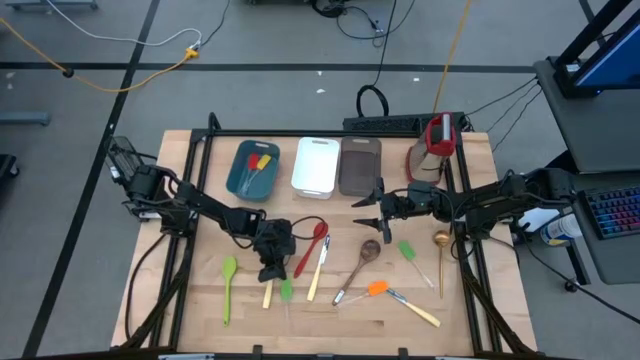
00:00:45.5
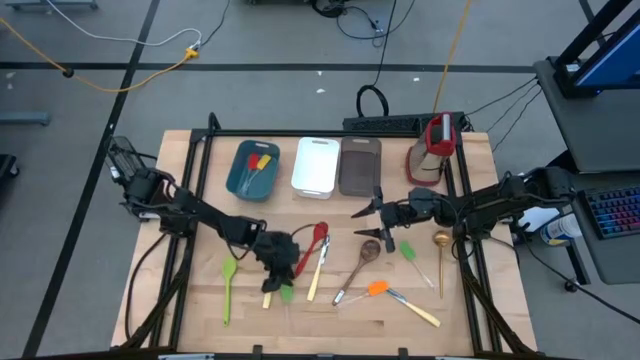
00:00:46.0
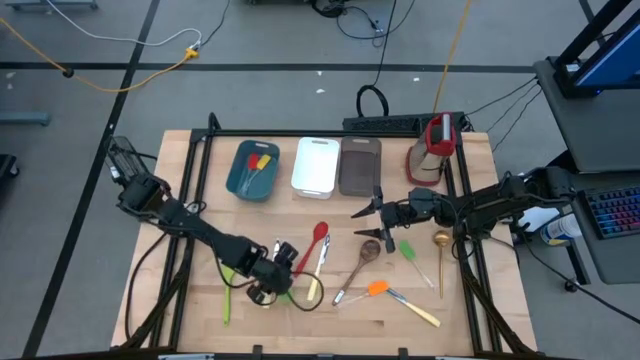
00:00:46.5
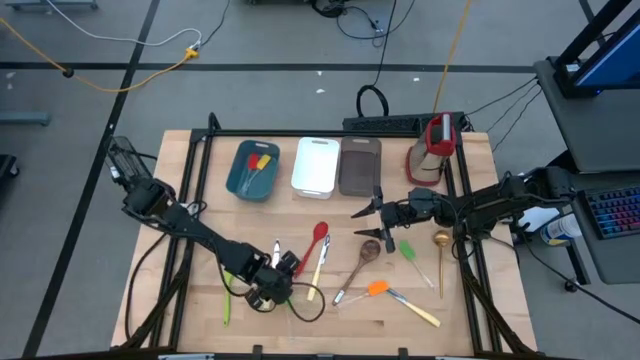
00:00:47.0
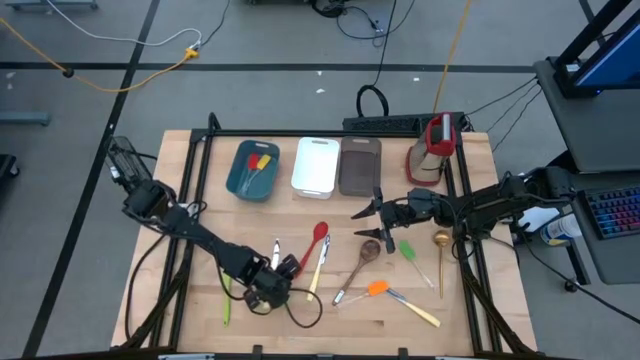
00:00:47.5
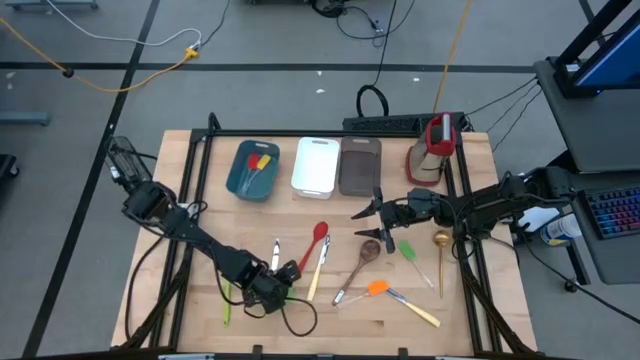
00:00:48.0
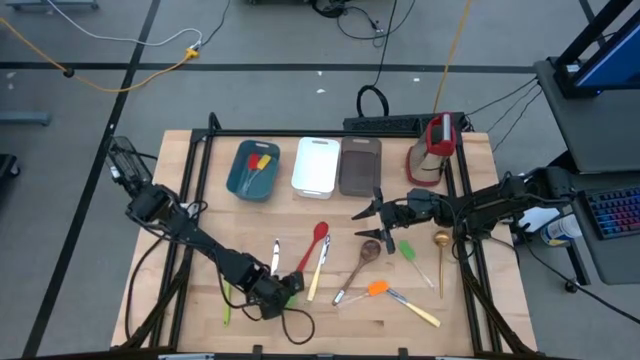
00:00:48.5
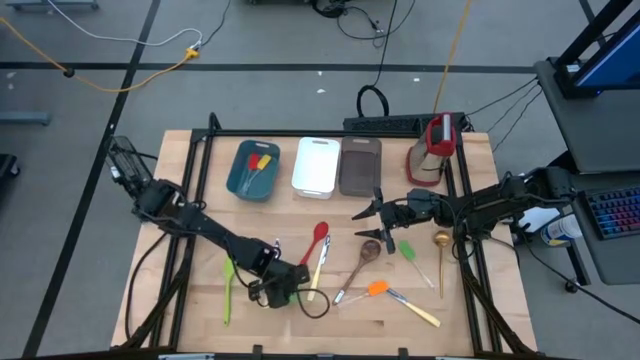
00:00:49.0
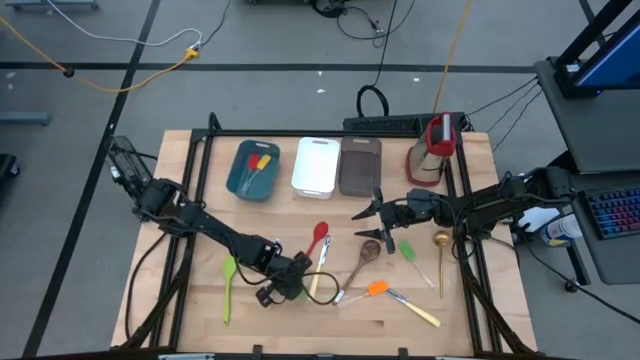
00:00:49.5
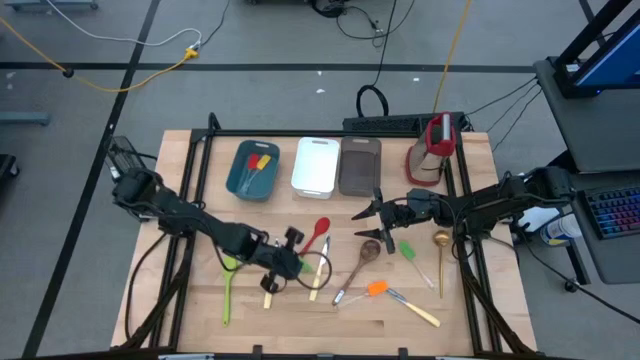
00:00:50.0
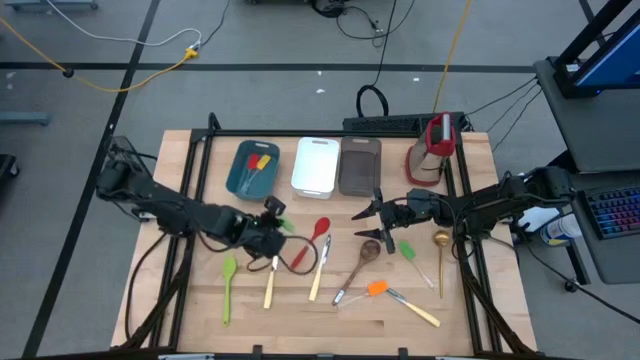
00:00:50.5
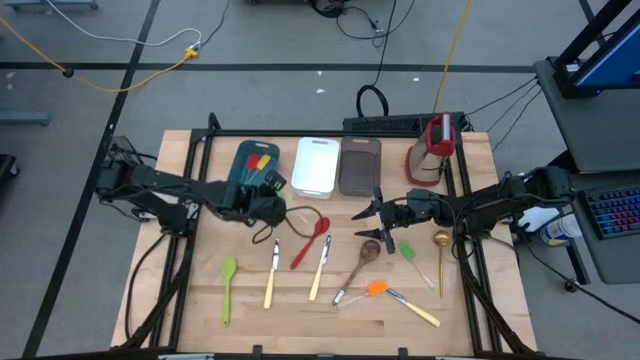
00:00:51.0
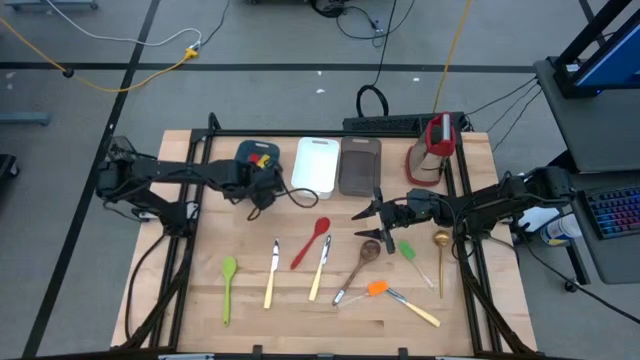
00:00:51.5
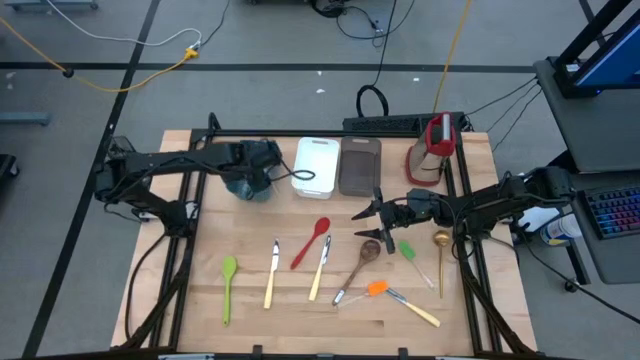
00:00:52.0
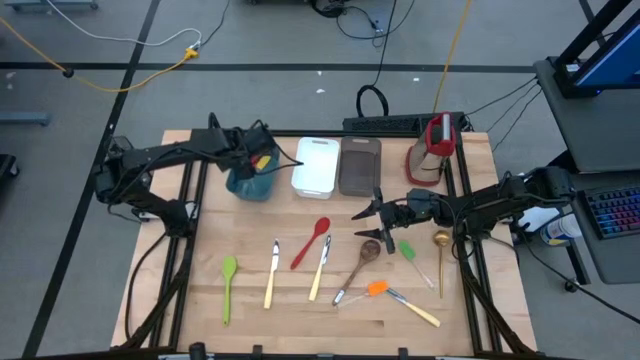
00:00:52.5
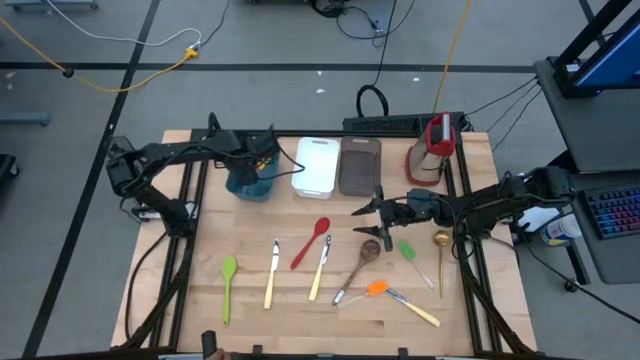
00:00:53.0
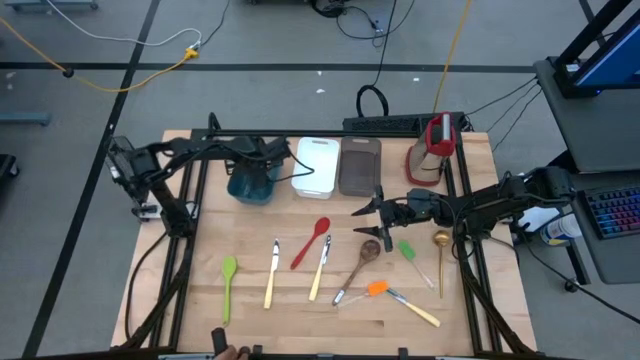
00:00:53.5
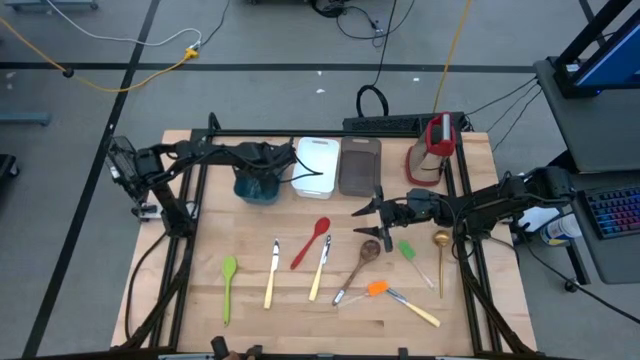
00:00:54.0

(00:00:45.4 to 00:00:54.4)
Task: Pick & Place Kitchen Items
Put the left green spatula into the blue bin

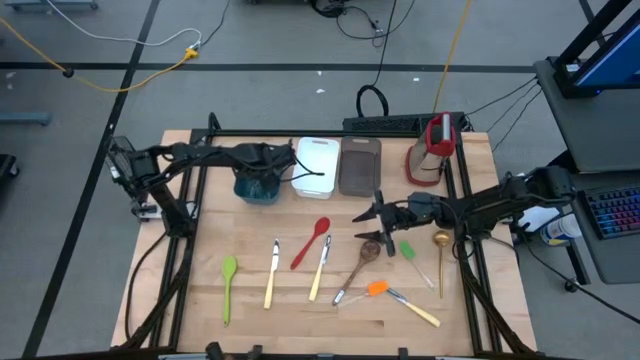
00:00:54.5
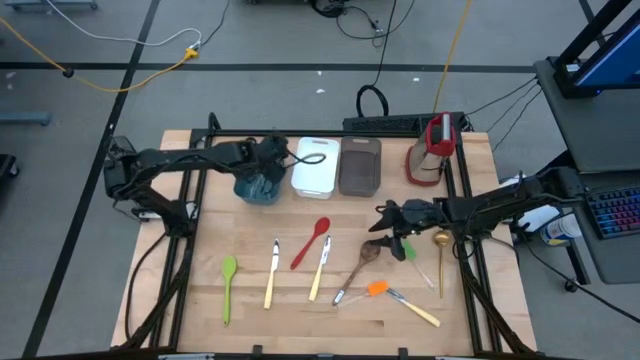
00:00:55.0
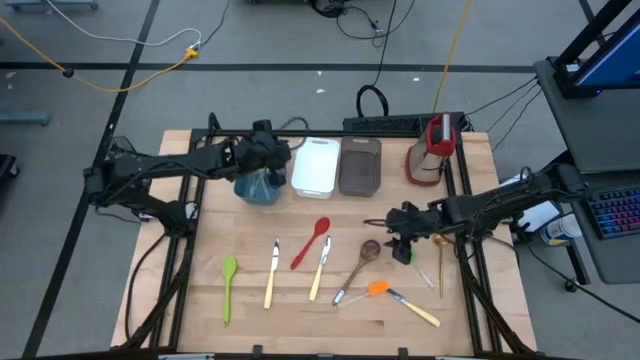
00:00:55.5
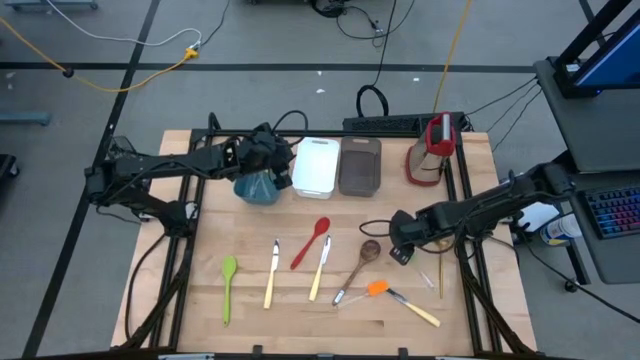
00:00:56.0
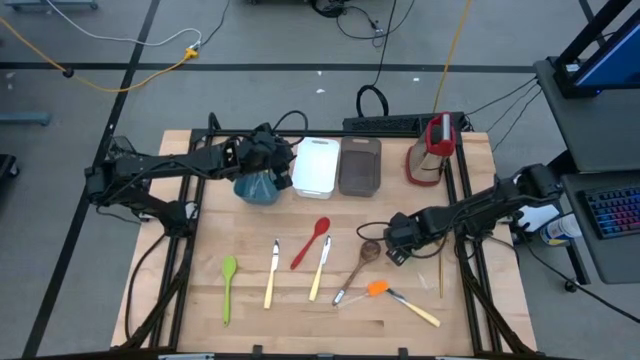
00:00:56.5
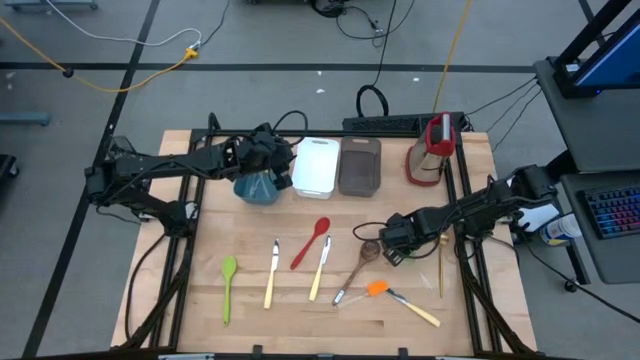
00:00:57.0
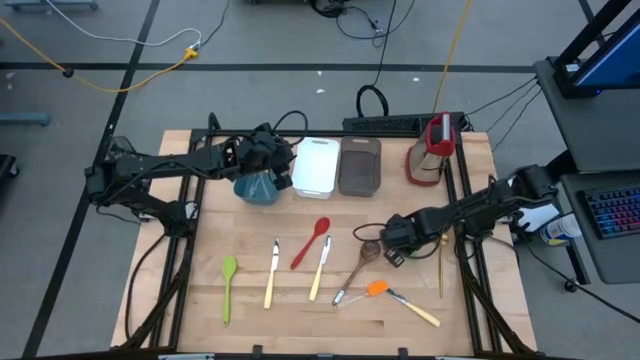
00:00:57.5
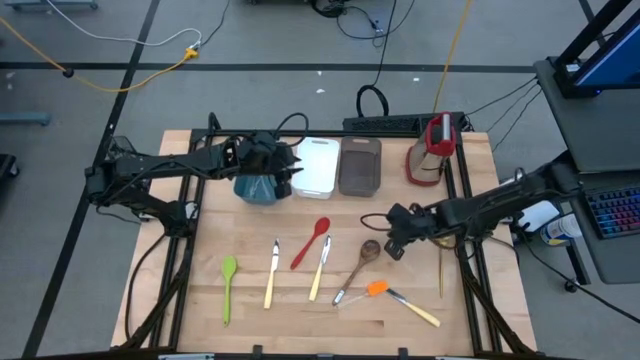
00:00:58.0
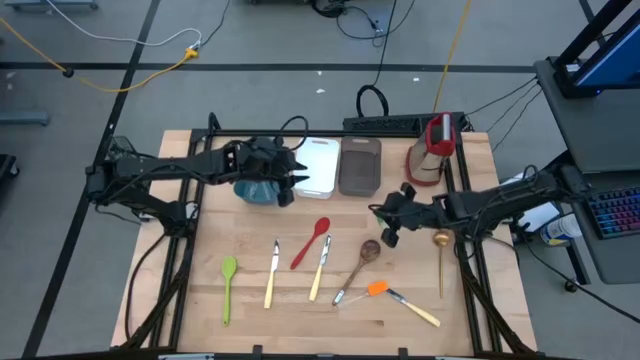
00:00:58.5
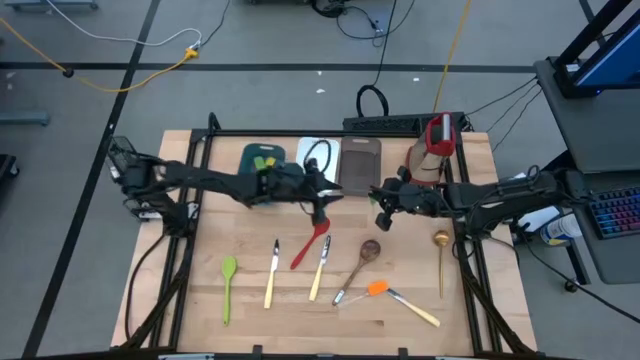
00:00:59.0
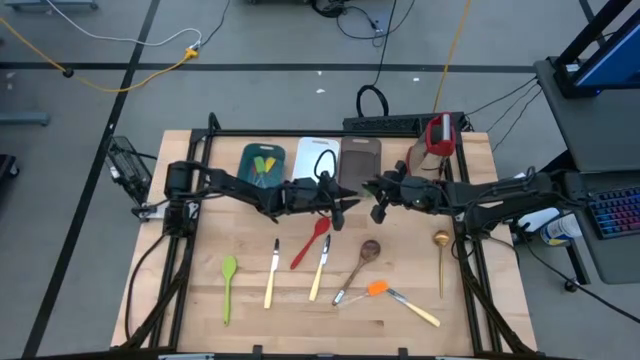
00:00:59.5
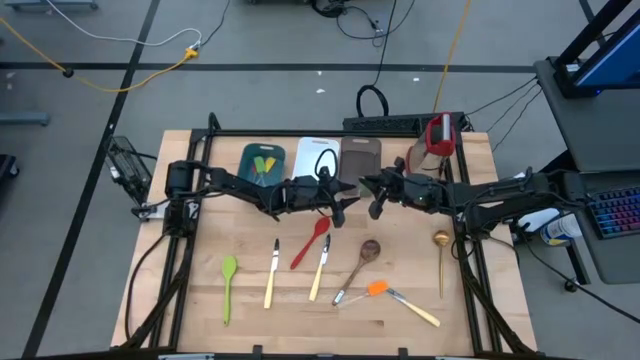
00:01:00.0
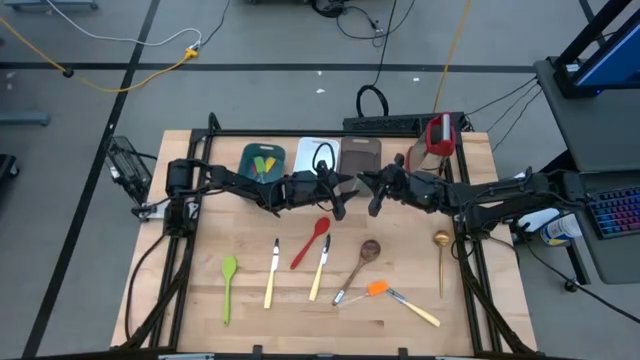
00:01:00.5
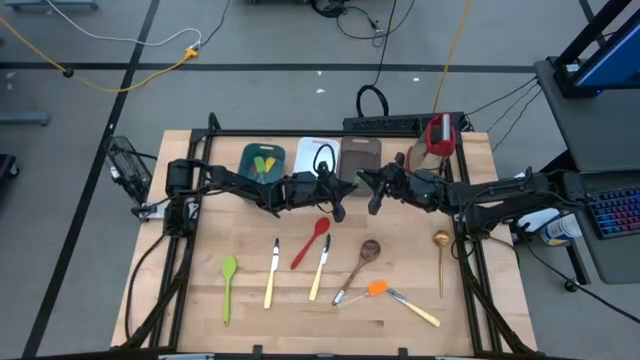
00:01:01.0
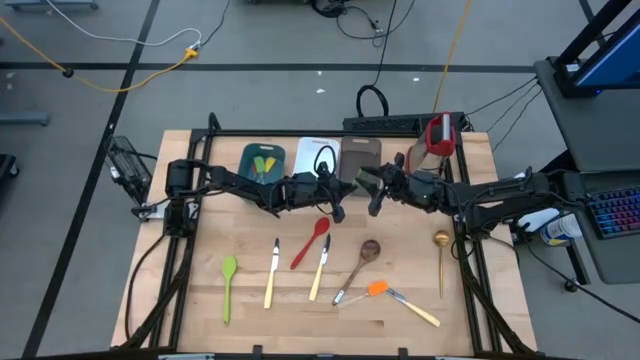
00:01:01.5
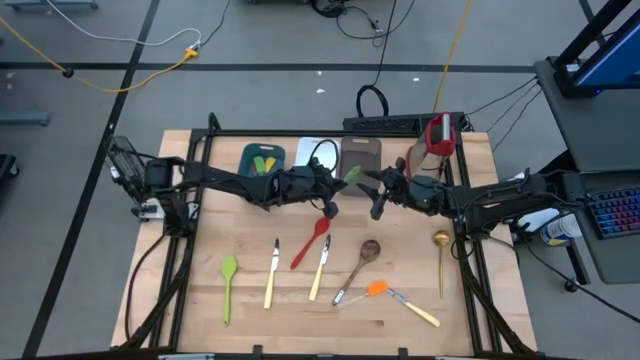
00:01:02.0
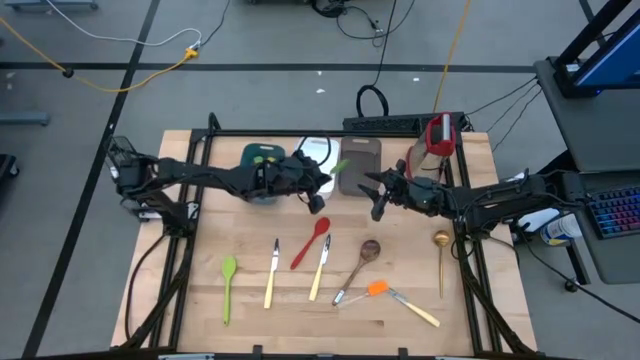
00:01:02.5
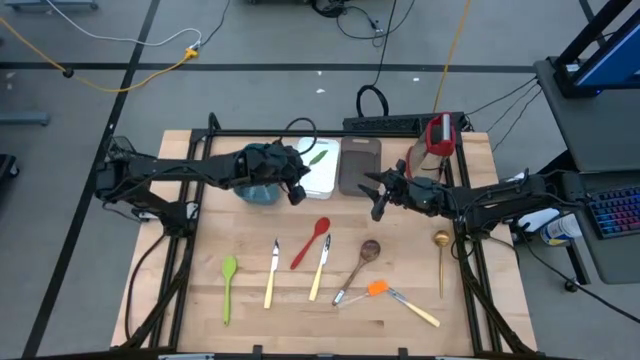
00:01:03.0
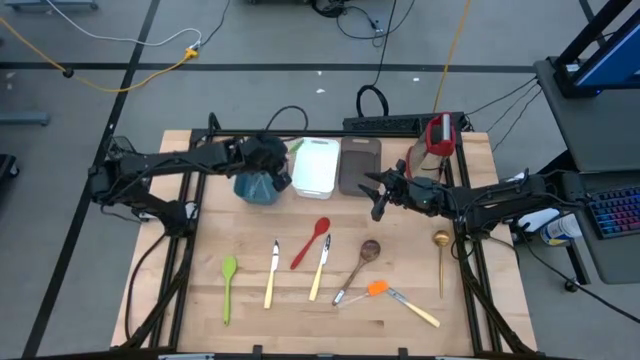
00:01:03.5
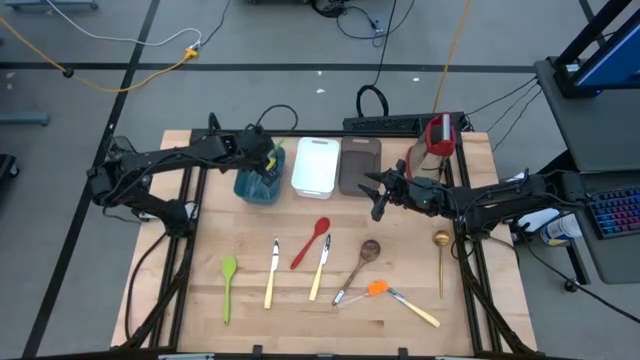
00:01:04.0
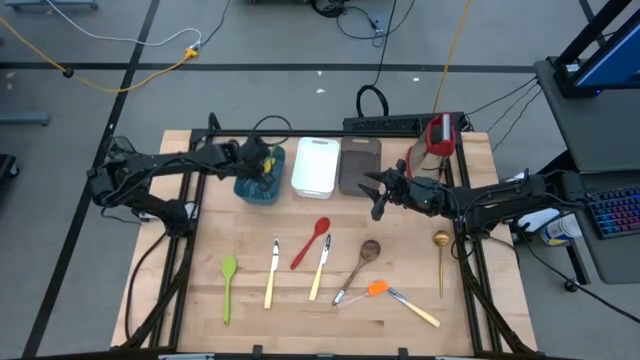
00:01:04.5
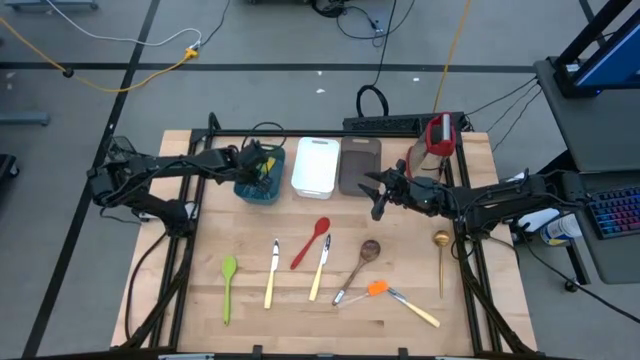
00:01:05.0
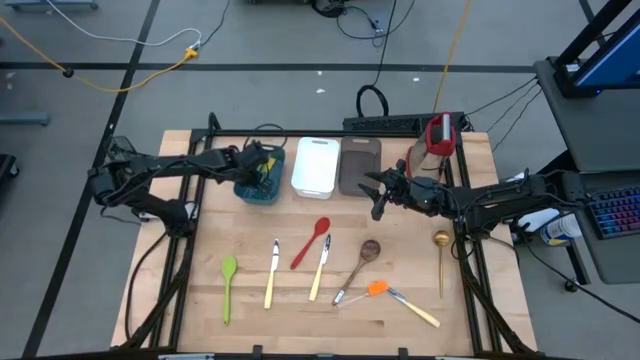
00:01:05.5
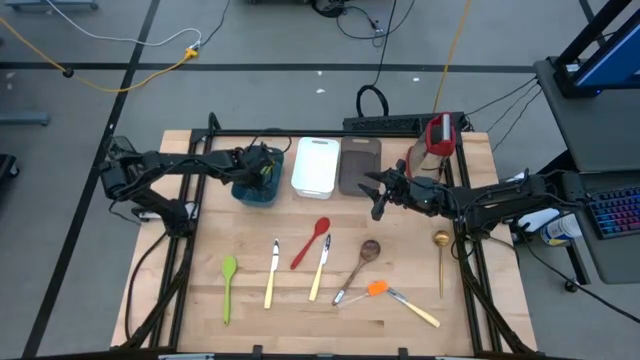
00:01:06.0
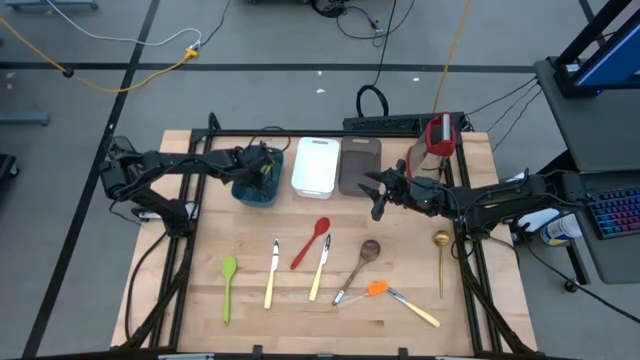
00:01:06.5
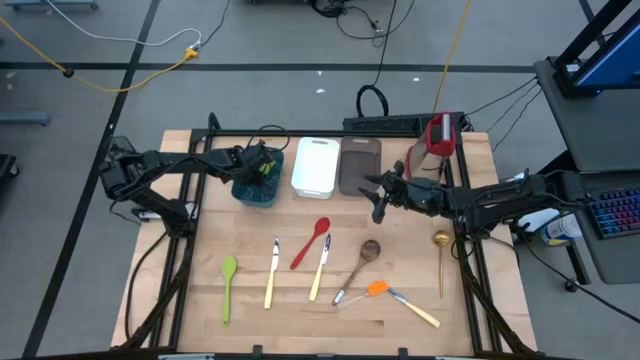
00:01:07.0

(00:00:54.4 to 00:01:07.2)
Put the green spatula into the blue bin
